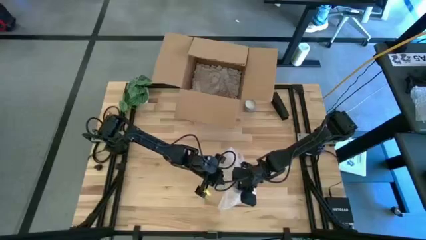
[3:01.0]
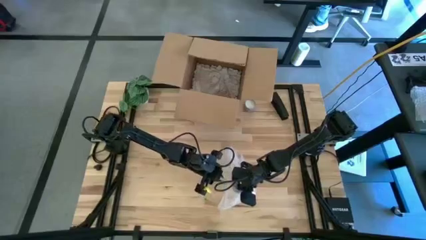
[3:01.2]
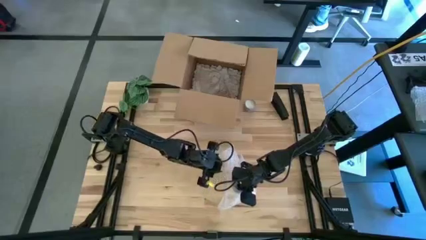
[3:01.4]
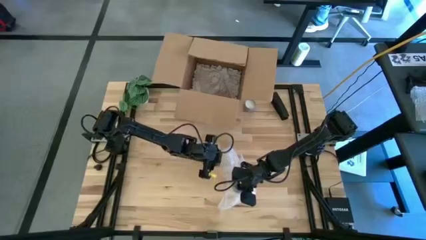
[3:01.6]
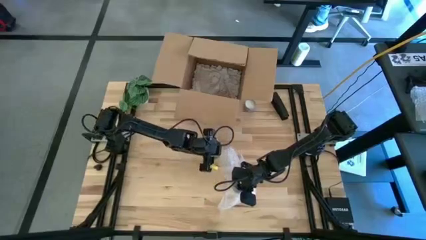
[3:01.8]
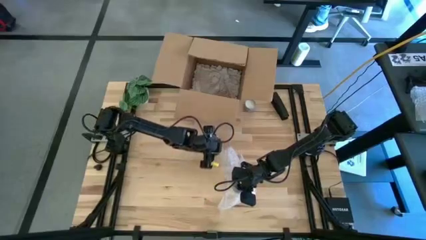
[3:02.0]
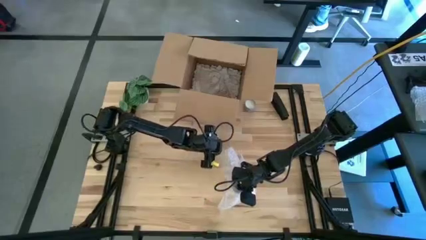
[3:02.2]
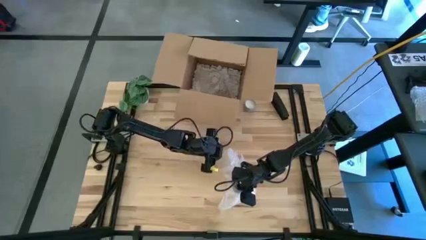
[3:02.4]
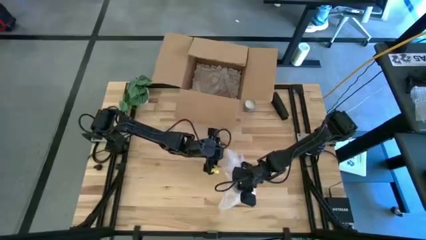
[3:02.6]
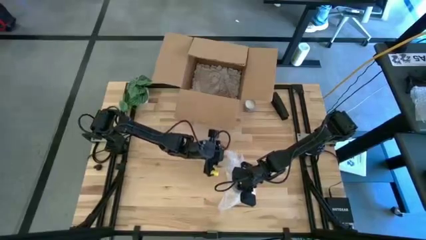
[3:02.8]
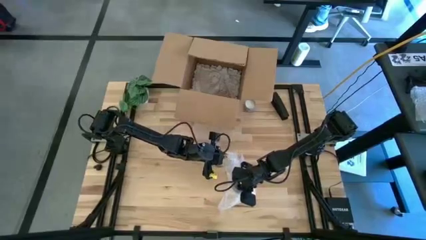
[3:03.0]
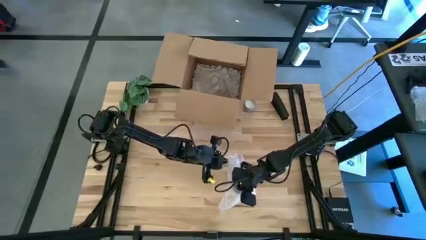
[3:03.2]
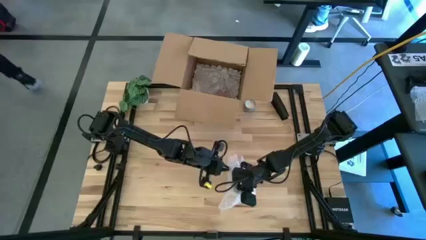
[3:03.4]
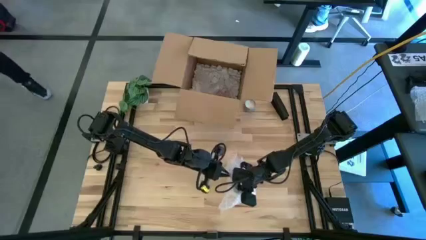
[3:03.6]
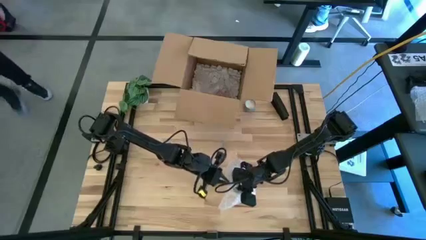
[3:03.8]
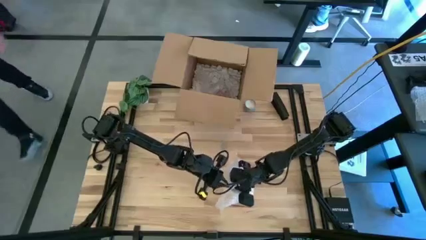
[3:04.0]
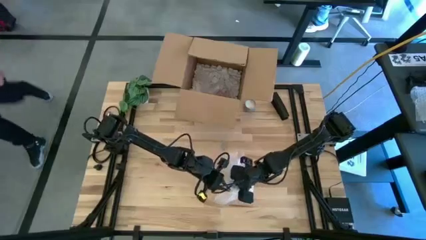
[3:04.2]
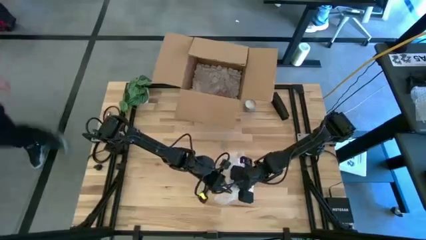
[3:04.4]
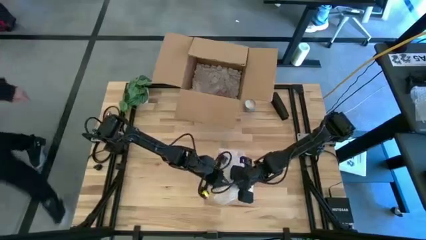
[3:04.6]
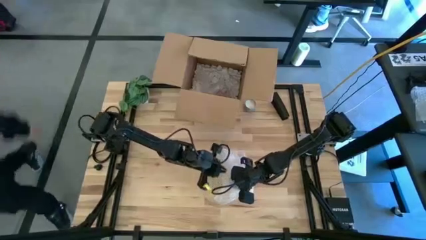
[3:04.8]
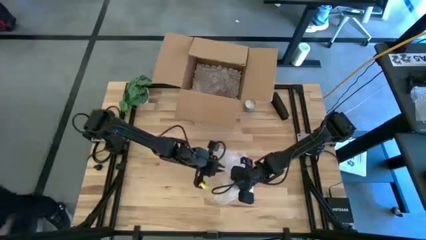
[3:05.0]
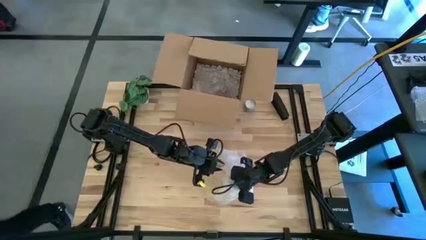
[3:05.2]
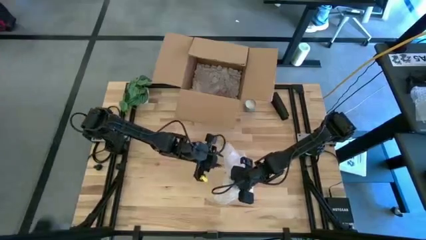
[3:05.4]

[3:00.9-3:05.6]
Task: wrap mug
Wrap the yellow mug with the bubble wrap

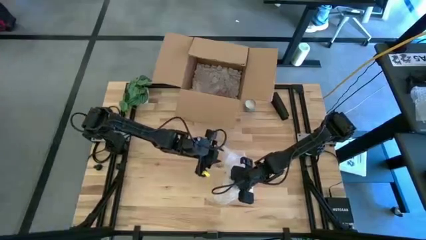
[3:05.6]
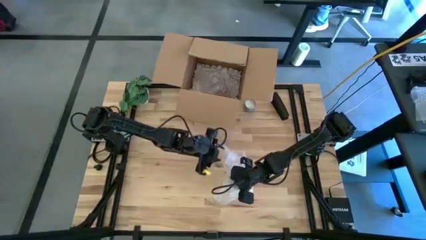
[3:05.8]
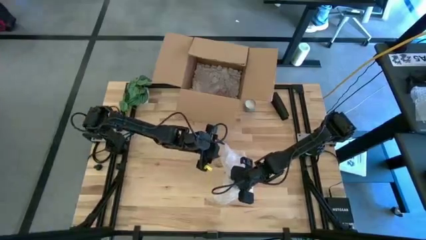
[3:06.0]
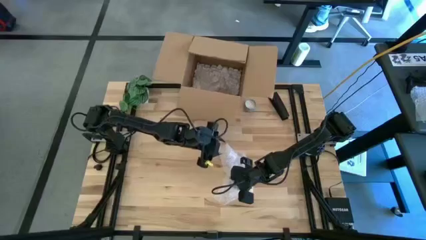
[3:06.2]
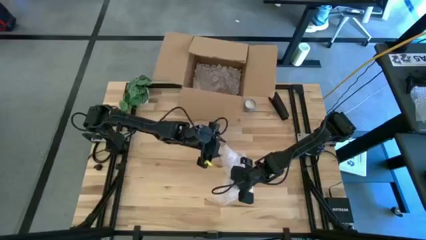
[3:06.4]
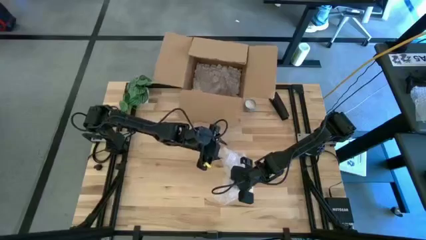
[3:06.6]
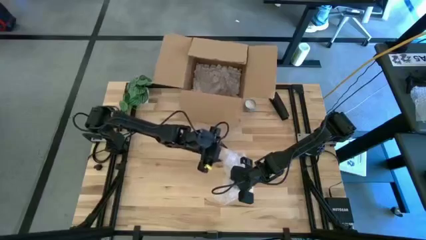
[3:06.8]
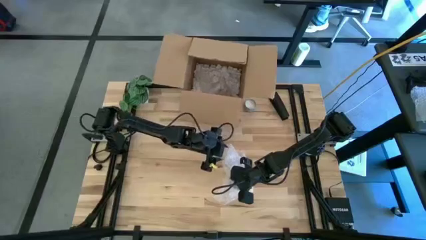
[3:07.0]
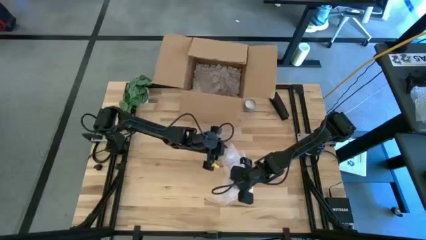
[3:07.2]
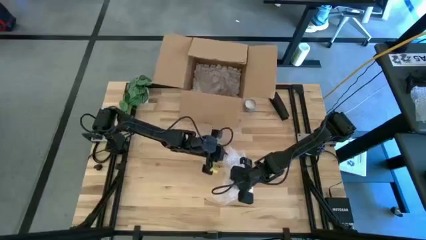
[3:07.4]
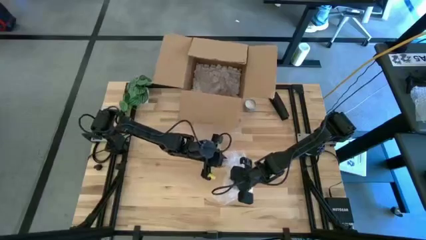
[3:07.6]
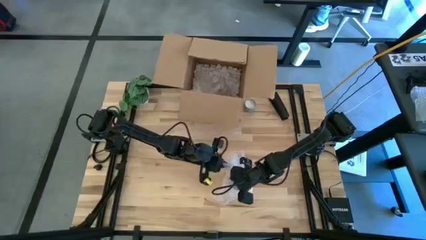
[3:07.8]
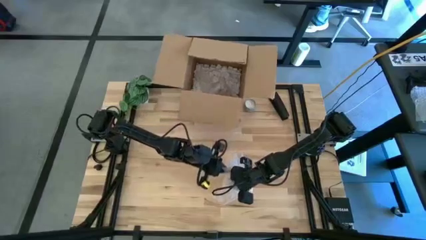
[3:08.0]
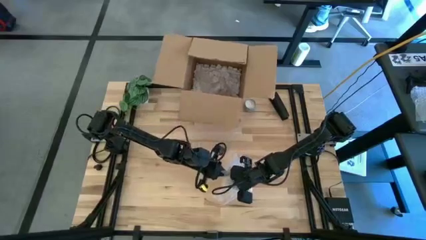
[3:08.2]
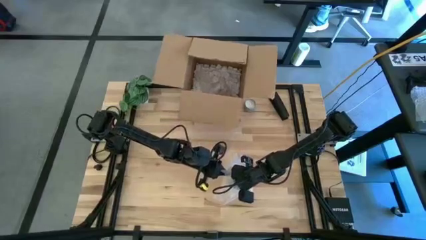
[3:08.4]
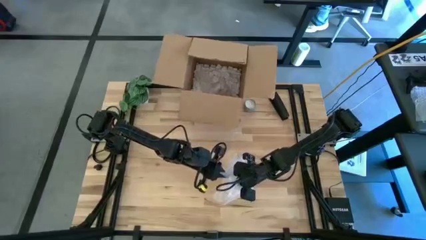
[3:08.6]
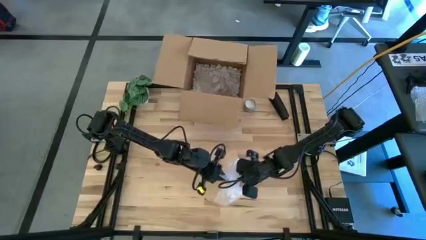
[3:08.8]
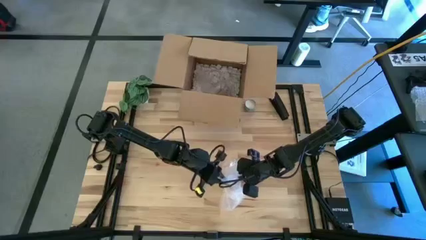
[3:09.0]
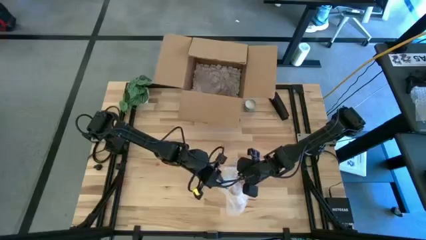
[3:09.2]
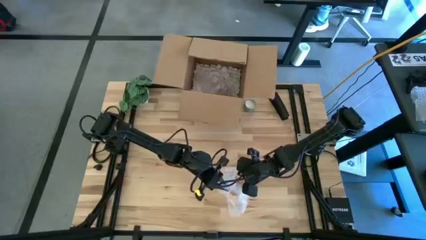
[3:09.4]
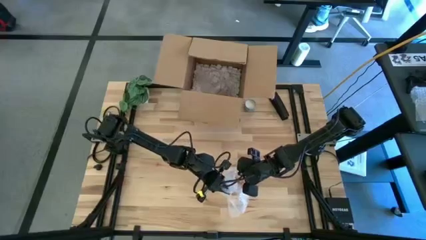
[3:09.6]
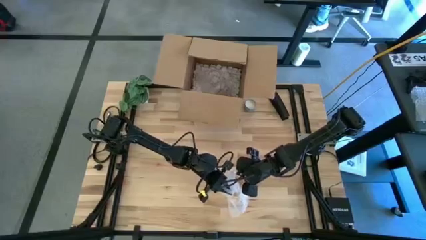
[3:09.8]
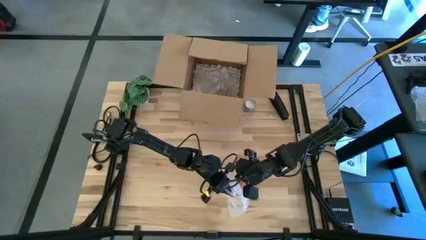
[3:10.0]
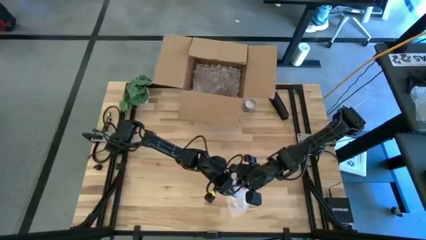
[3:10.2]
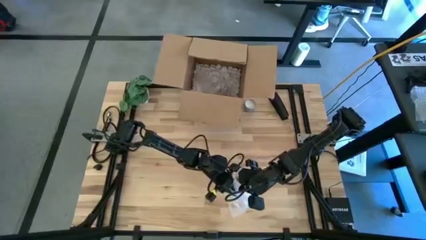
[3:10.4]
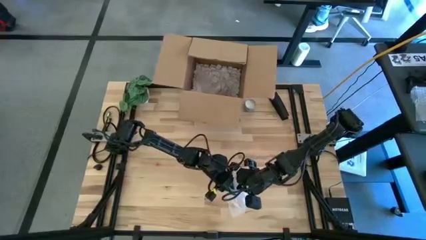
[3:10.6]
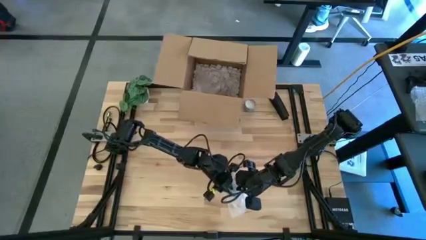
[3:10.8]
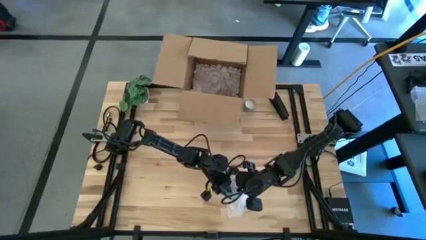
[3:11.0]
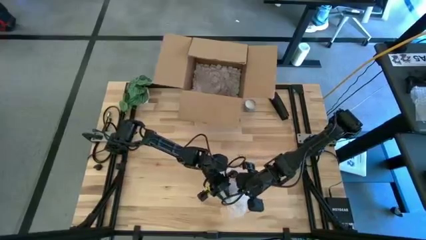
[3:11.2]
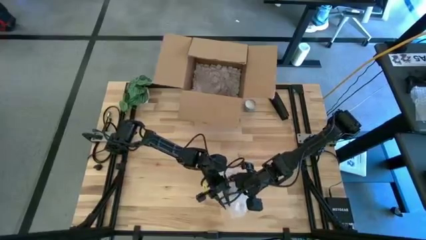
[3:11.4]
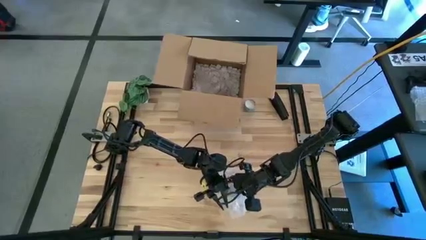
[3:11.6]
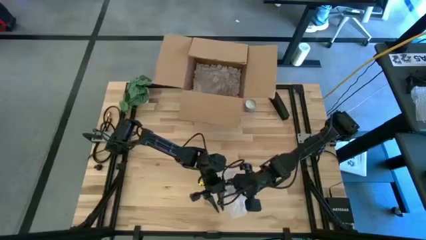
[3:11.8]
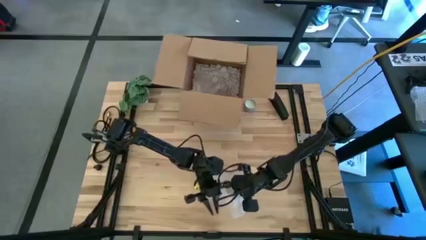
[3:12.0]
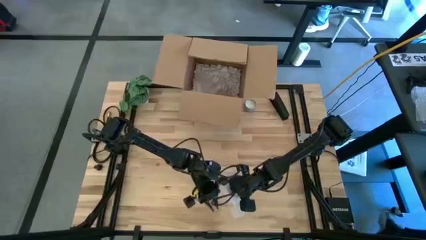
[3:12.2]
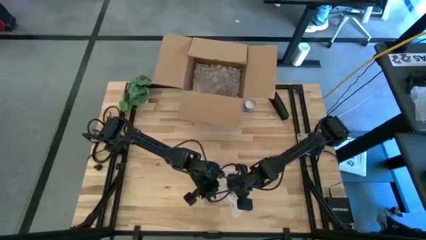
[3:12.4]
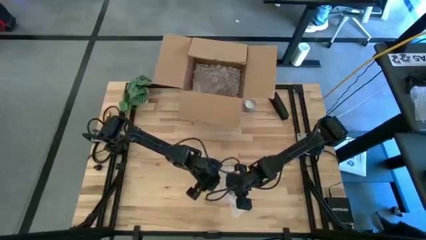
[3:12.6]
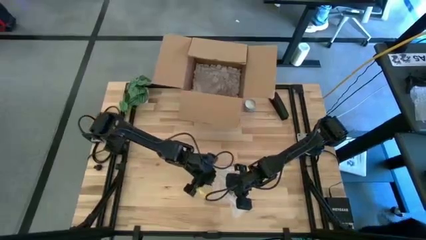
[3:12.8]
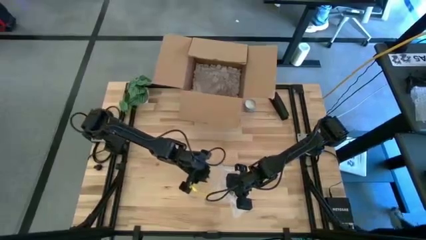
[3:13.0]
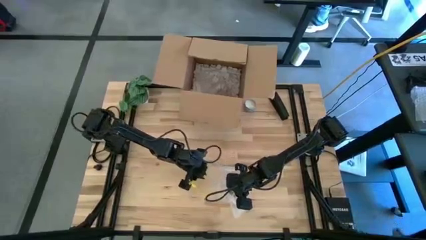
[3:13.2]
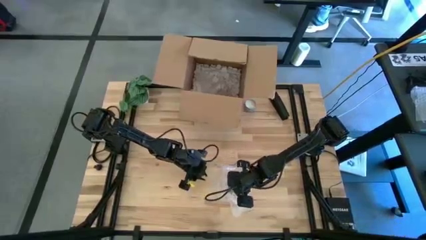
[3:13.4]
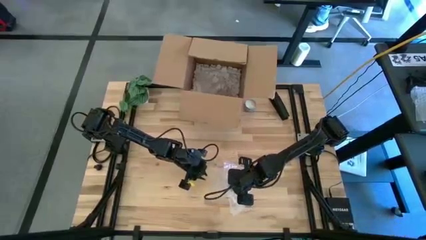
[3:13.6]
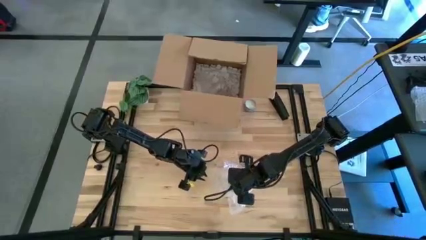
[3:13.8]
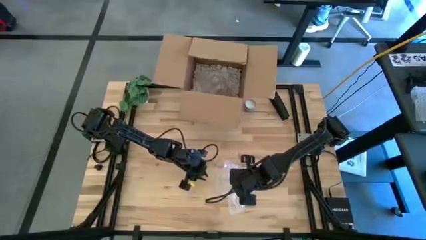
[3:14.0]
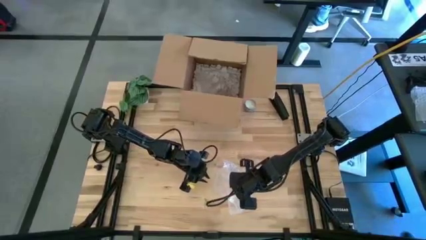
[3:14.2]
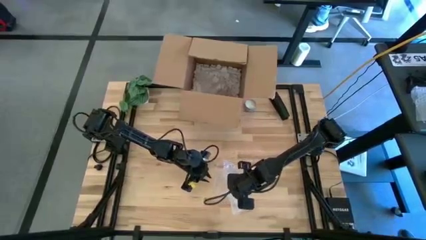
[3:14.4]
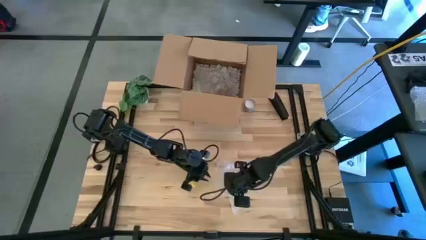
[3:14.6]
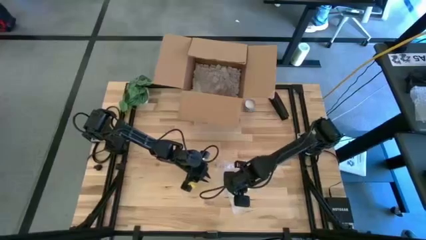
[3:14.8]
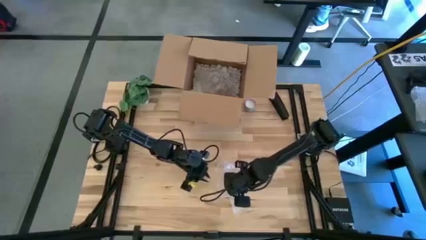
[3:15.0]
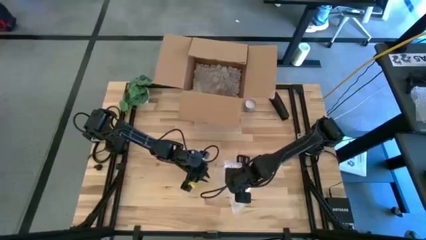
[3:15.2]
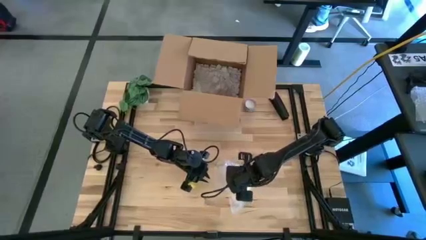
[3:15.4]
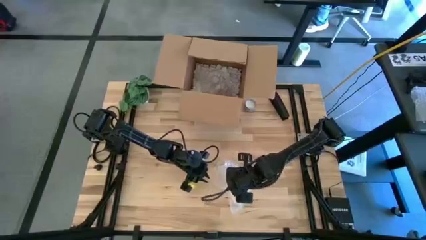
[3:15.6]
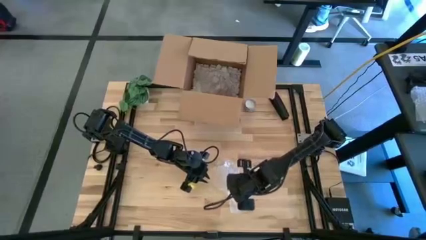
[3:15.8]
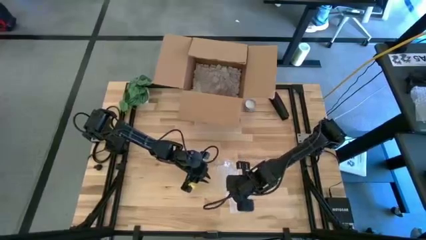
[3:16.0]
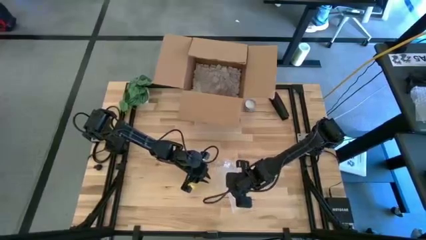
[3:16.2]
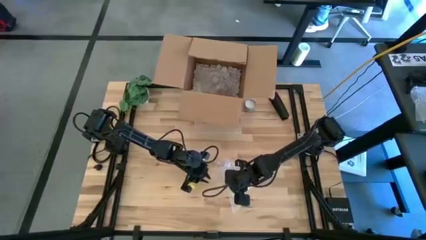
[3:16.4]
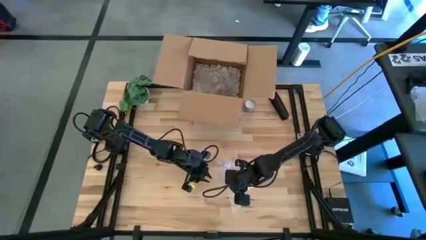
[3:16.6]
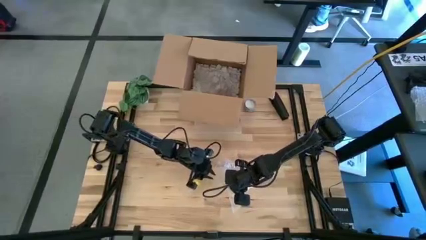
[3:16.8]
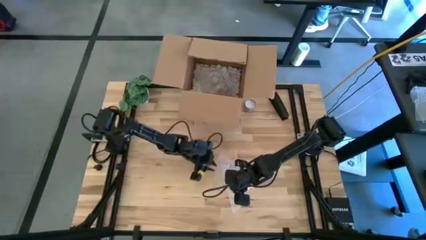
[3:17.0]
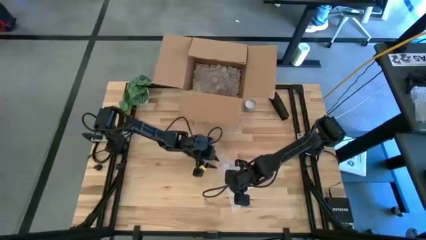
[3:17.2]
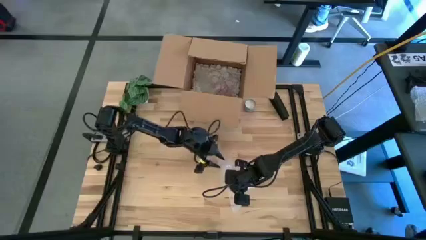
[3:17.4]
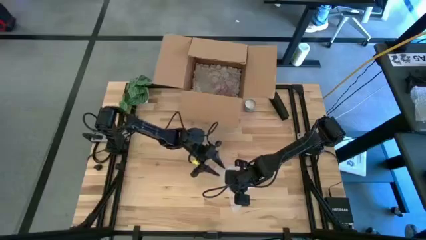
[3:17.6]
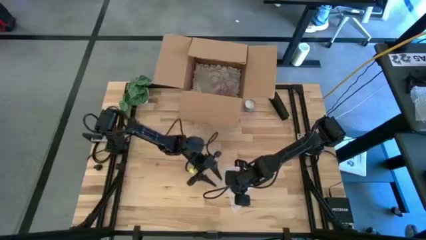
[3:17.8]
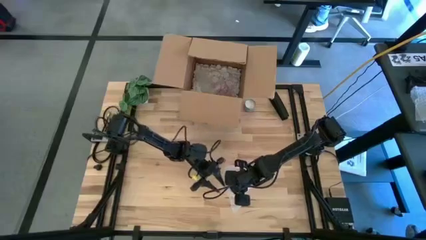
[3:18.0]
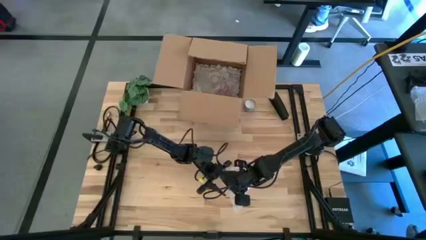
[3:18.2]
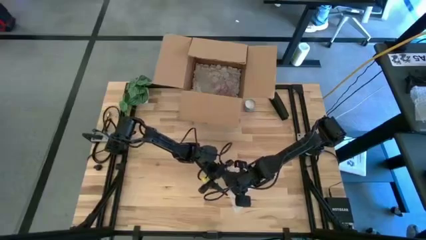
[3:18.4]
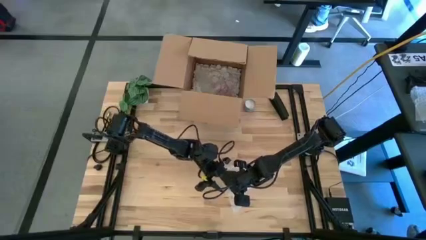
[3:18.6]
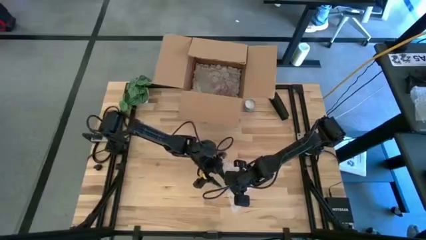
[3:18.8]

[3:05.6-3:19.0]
Wrap the yellow mug with the bubble wrap
